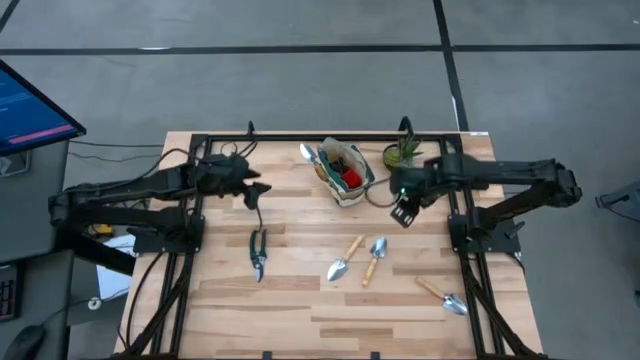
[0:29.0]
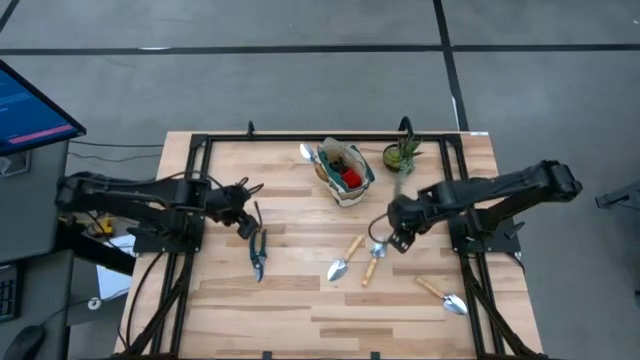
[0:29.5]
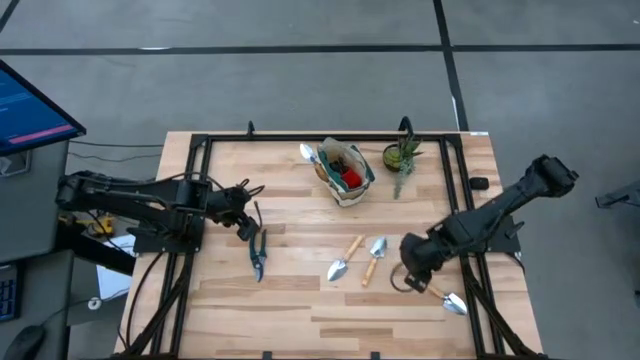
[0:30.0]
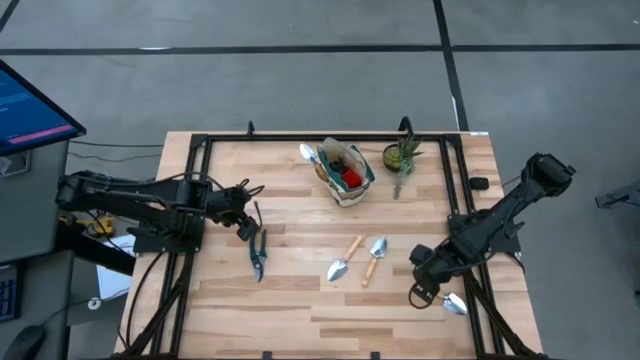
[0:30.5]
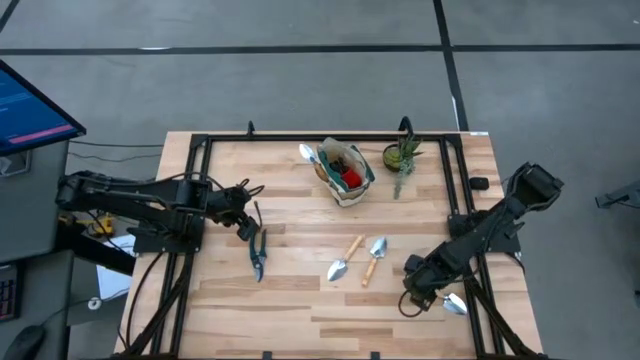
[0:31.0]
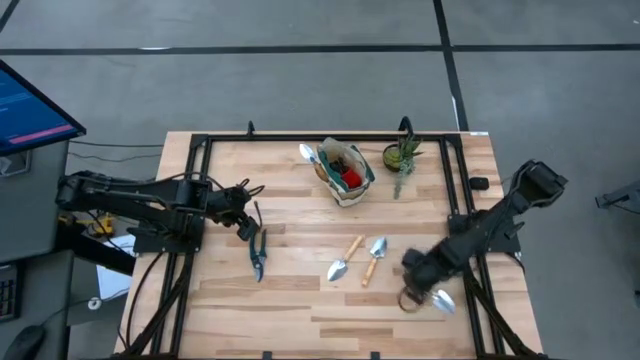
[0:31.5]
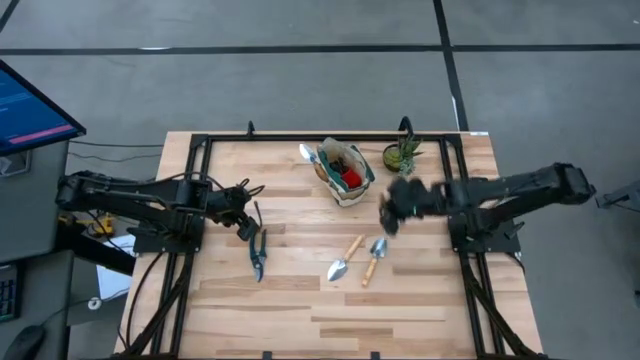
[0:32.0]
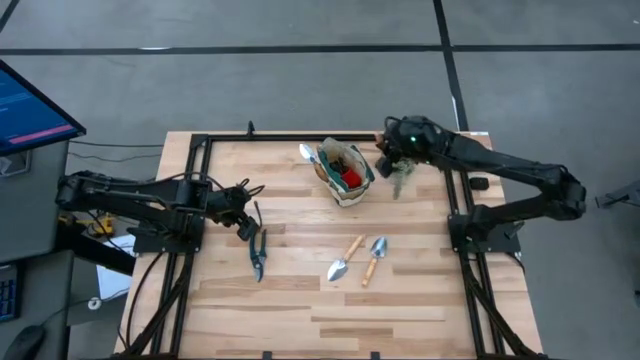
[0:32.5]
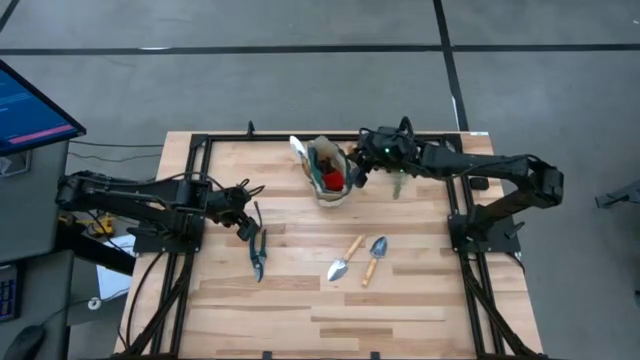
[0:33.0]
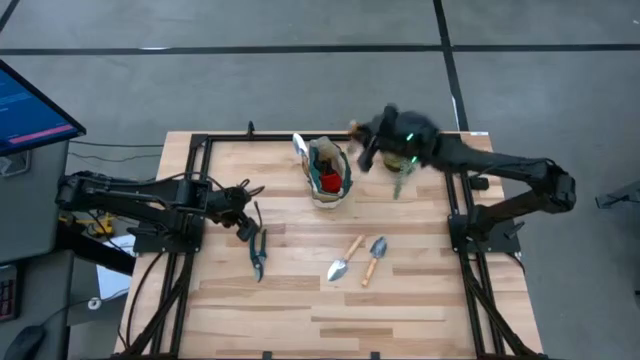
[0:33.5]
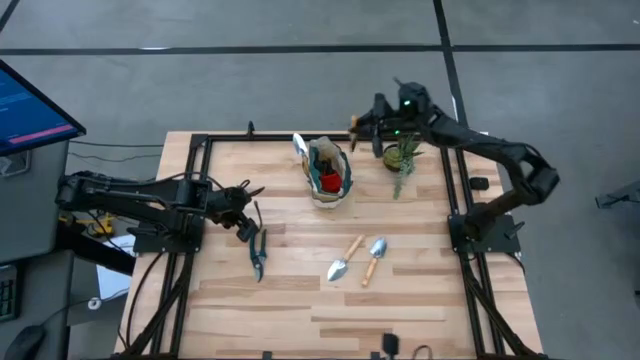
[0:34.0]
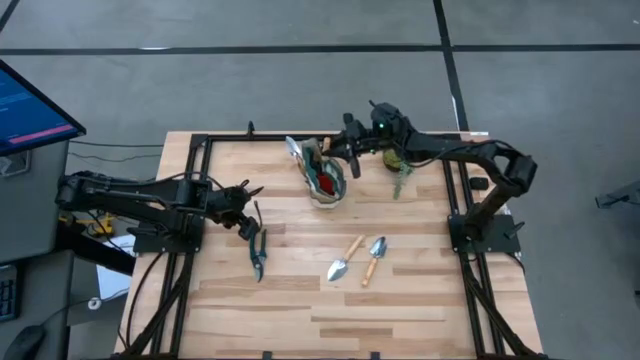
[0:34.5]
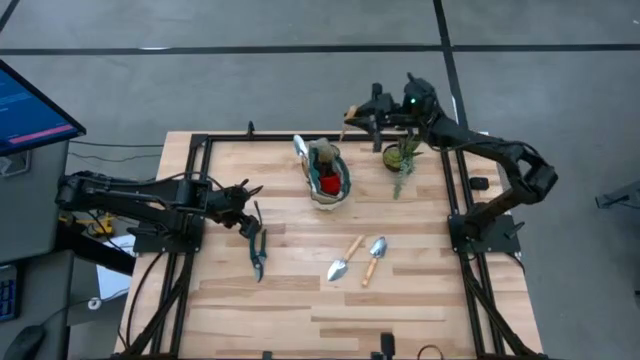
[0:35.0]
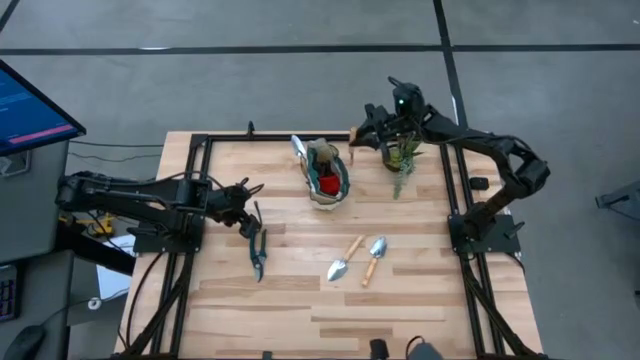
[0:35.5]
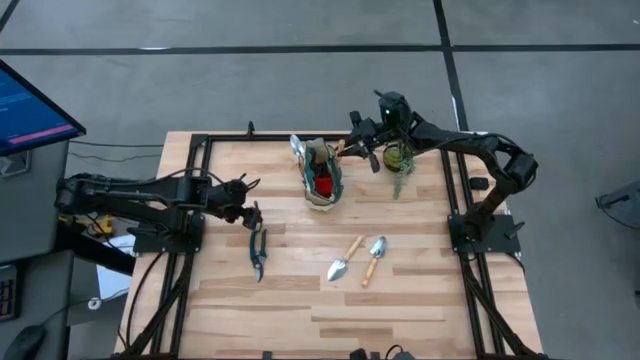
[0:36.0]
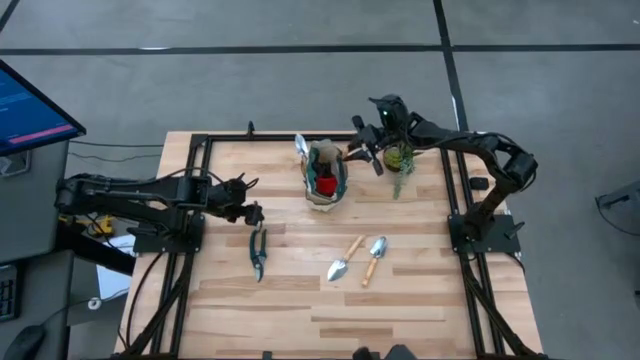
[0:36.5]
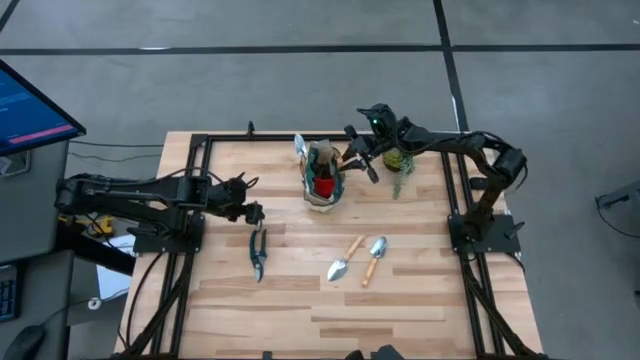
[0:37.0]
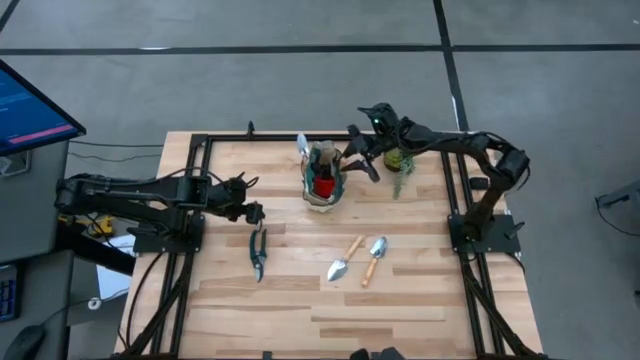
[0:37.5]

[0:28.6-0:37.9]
Task: Pick & Place Garden tools in Gardening bag
Put the brown trowel into the brown gardening bag

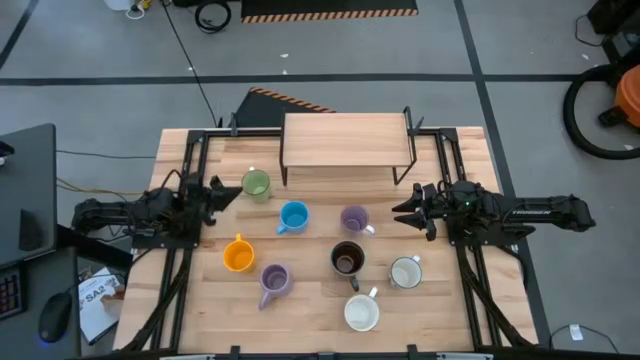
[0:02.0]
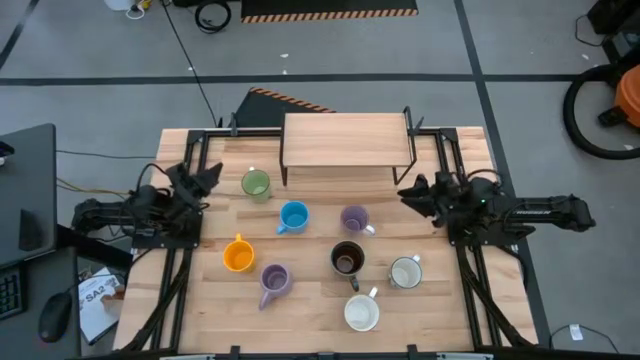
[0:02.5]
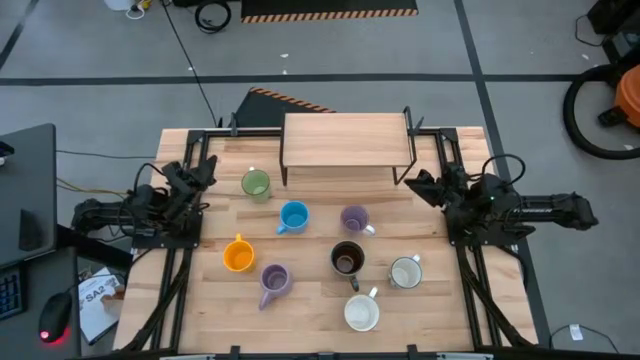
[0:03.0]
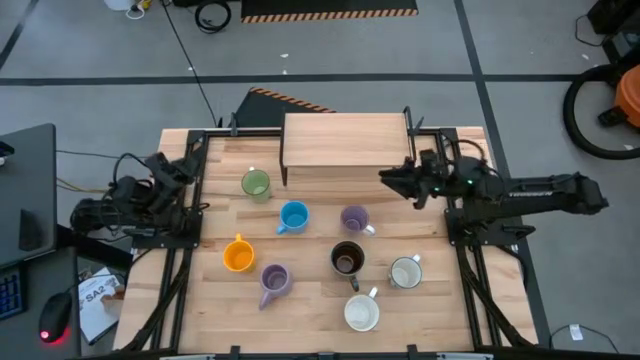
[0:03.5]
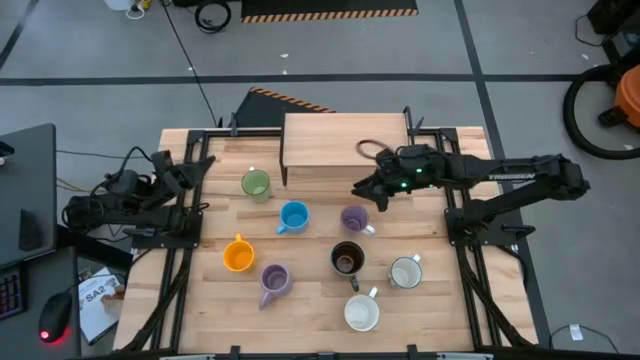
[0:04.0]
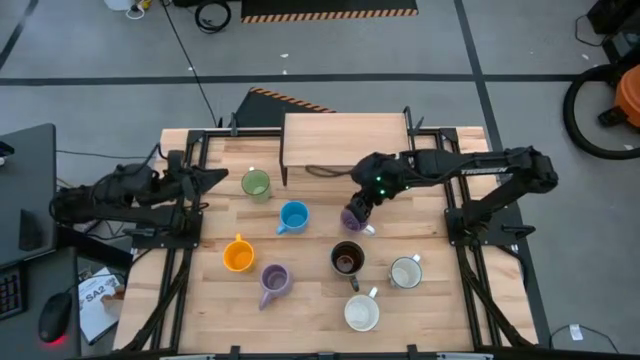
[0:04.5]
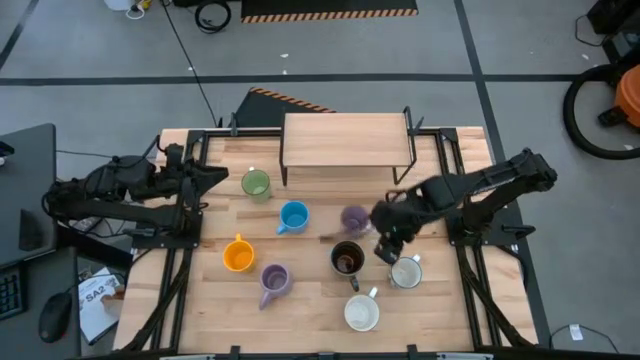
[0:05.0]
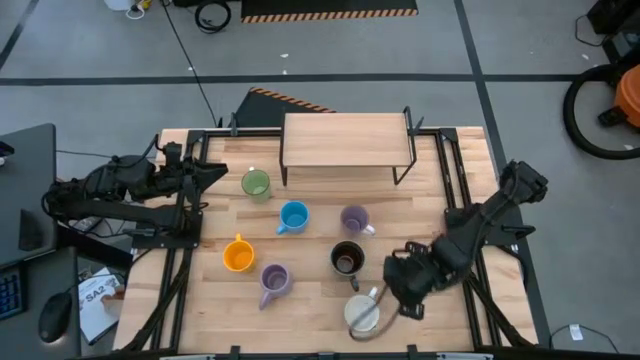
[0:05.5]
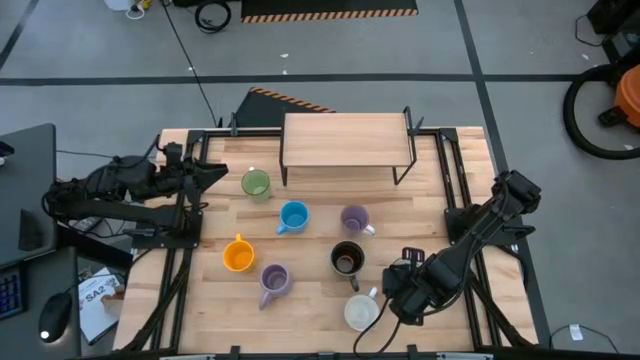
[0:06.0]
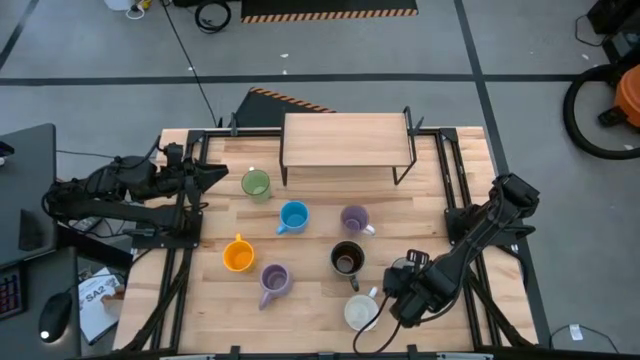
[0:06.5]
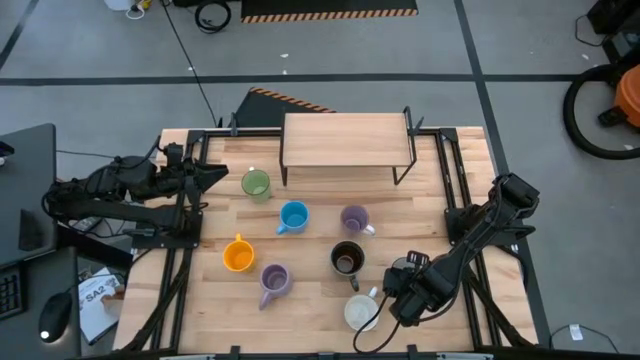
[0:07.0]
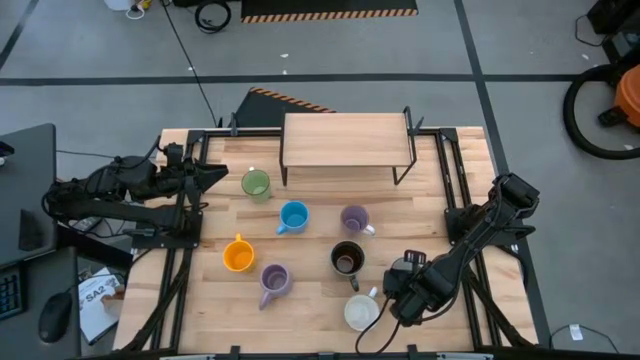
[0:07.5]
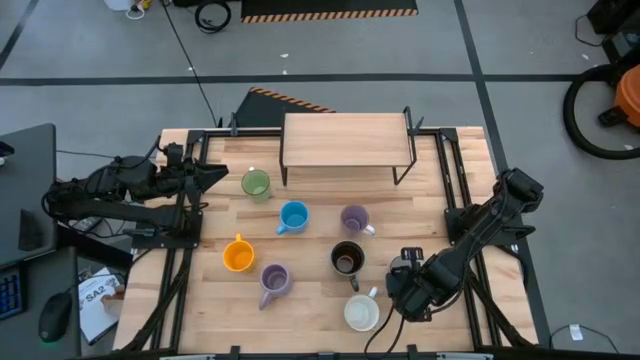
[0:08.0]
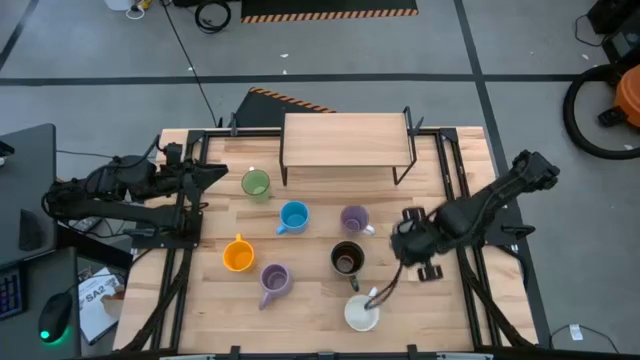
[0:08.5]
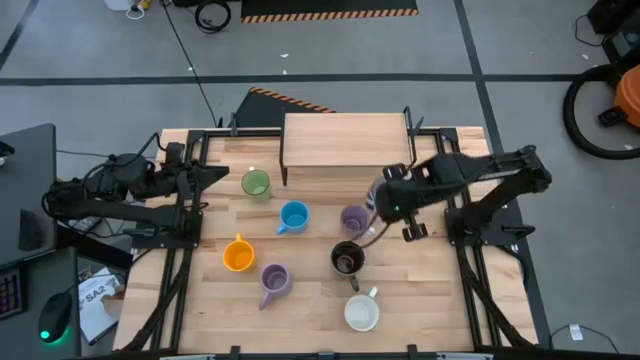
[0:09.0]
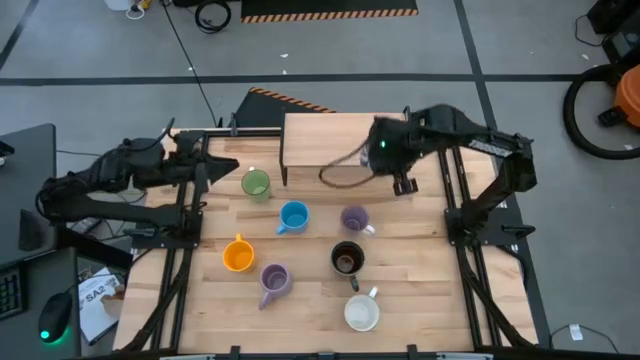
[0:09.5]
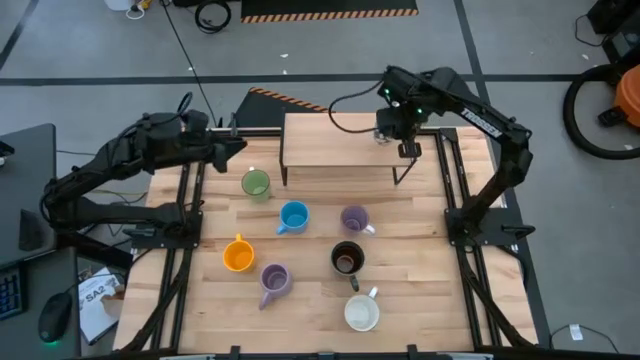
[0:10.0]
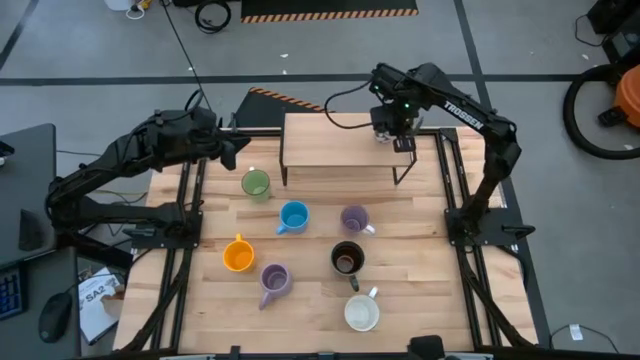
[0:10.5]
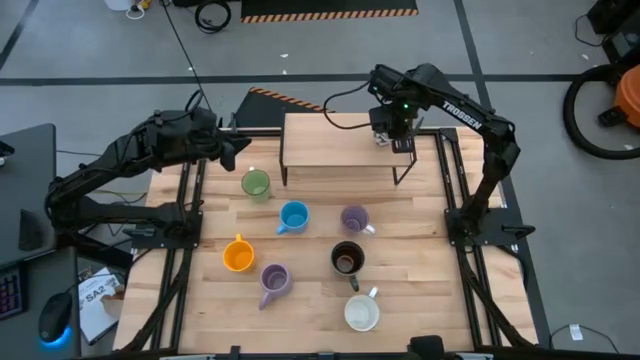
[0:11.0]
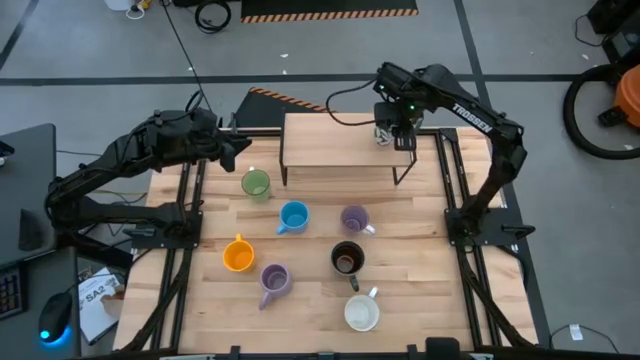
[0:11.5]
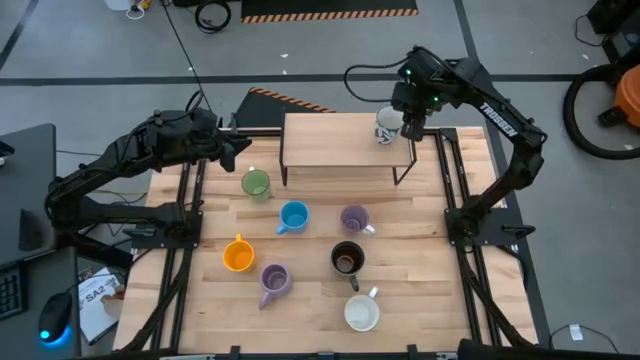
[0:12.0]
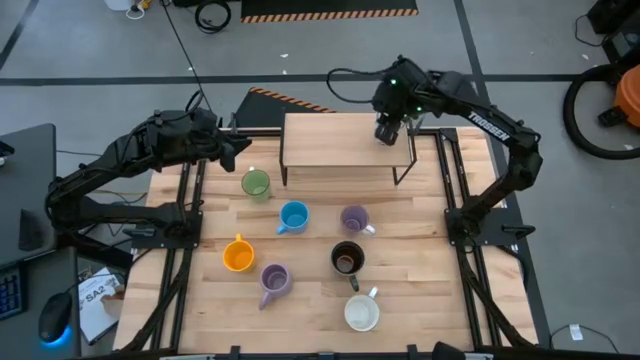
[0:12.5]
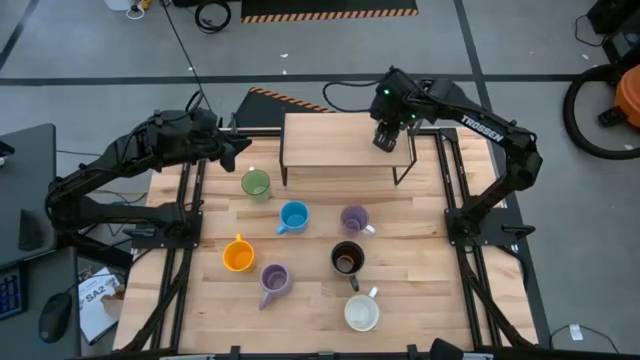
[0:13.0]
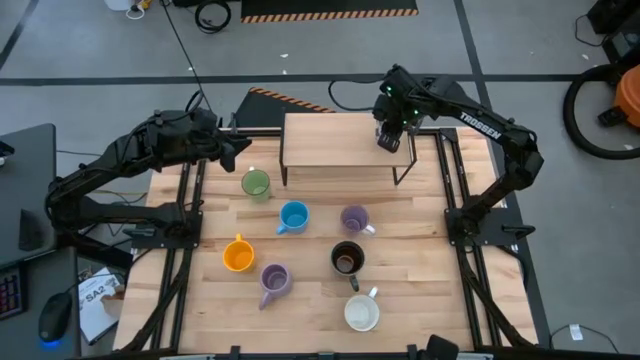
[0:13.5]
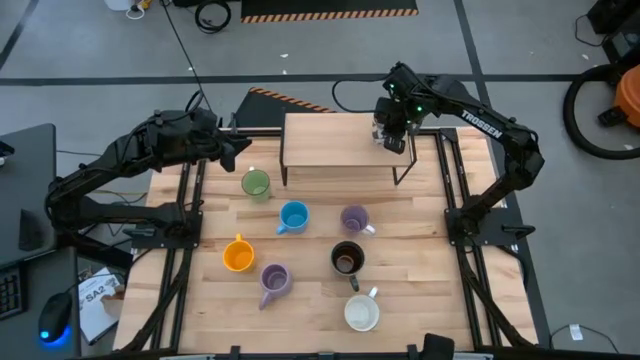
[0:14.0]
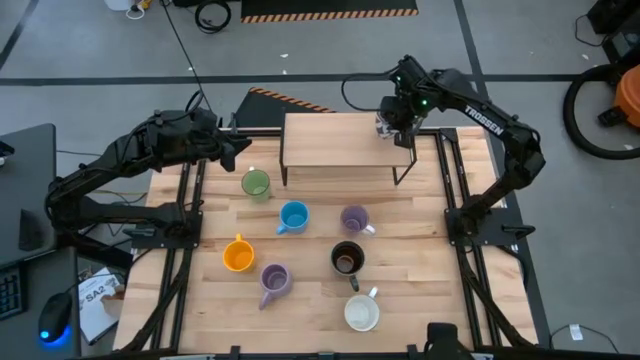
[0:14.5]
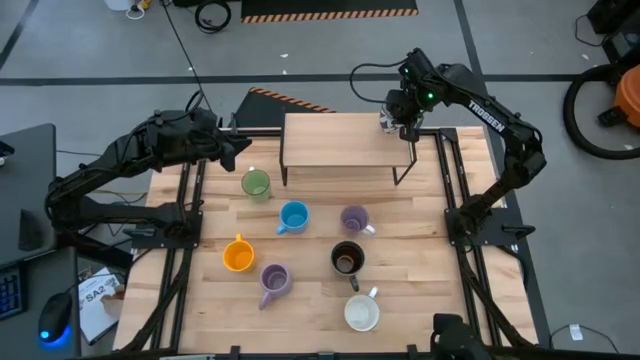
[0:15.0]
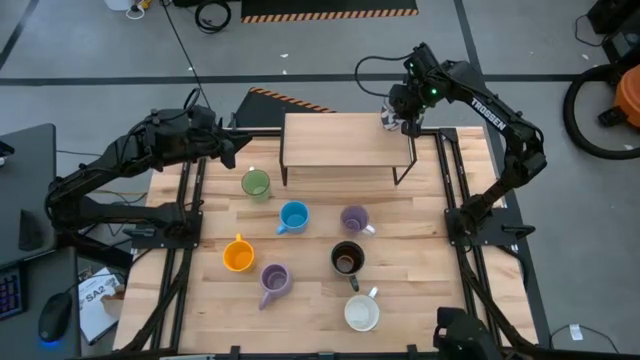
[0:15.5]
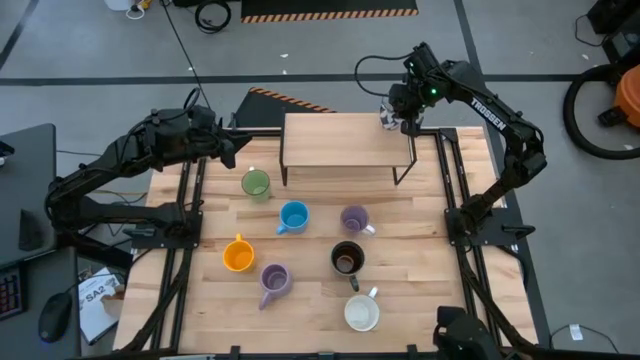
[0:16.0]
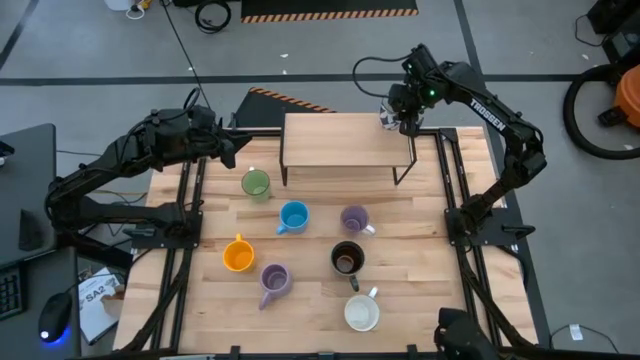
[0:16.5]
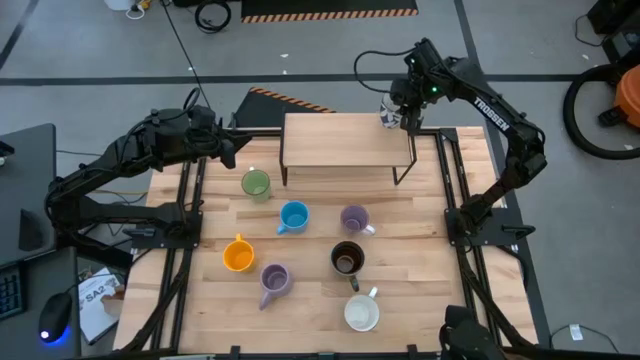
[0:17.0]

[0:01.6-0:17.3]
Task: Place coffee mugs
Put the blue patterned mug on the shelf
